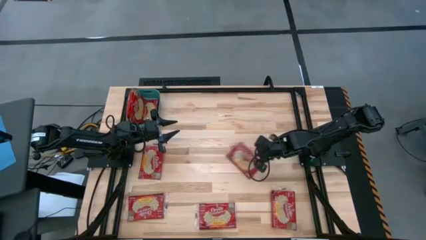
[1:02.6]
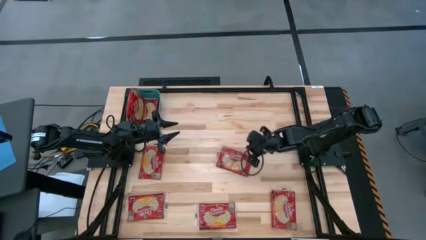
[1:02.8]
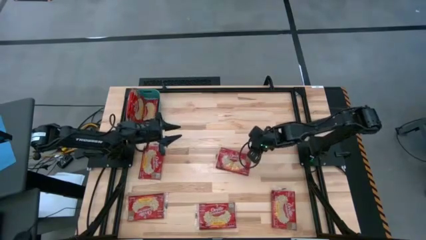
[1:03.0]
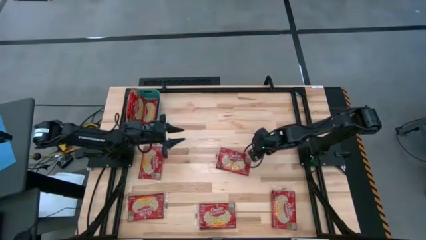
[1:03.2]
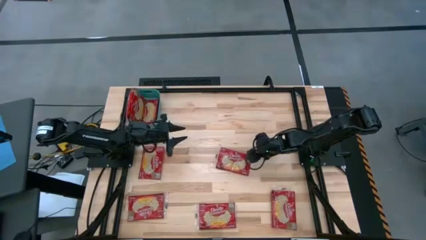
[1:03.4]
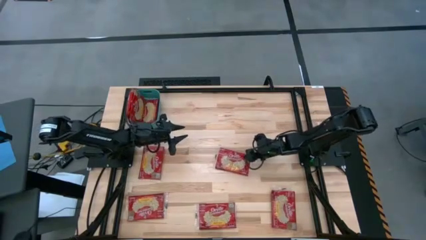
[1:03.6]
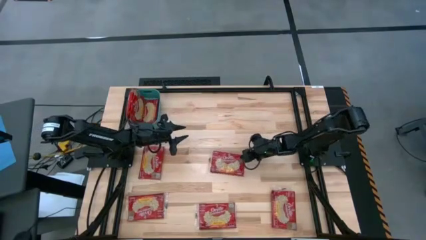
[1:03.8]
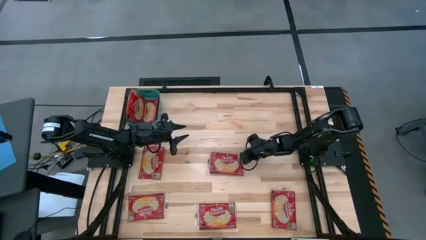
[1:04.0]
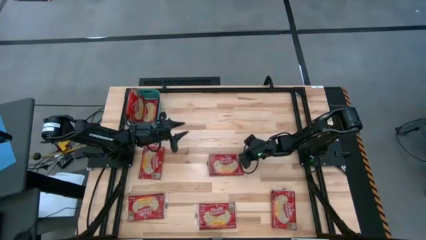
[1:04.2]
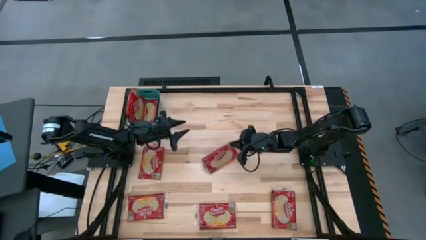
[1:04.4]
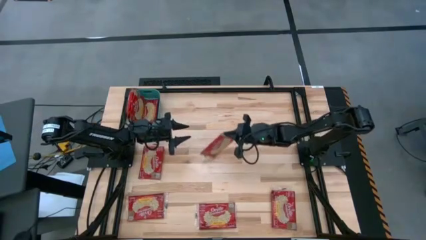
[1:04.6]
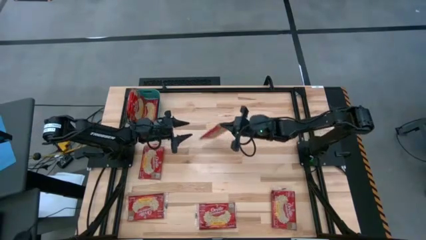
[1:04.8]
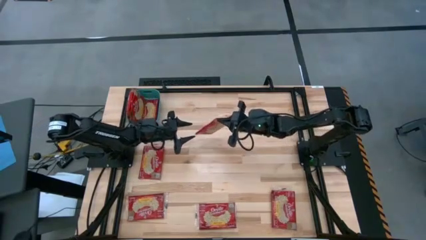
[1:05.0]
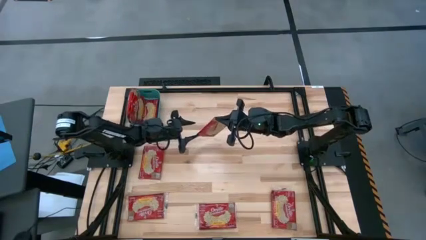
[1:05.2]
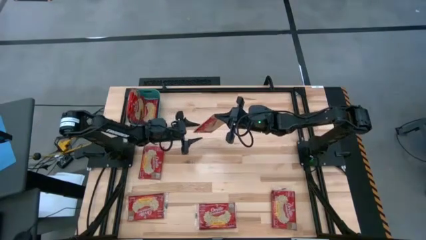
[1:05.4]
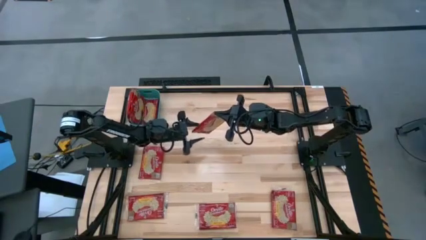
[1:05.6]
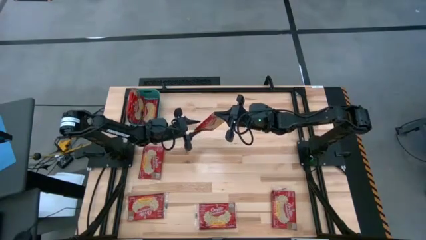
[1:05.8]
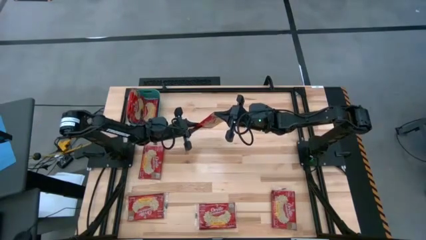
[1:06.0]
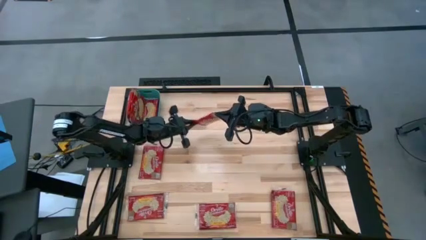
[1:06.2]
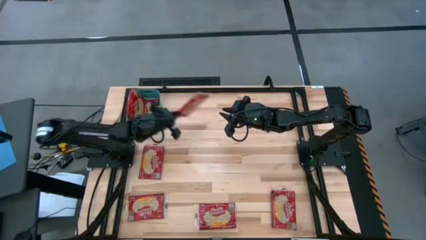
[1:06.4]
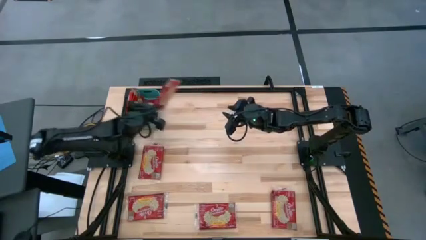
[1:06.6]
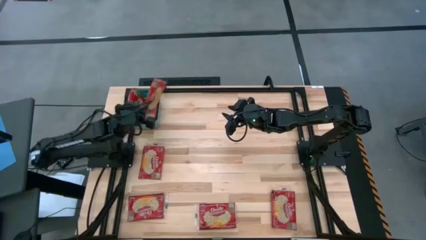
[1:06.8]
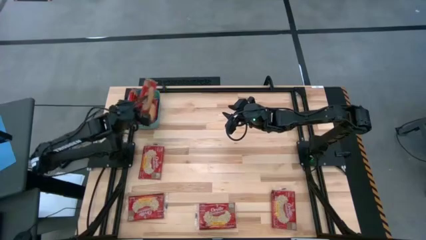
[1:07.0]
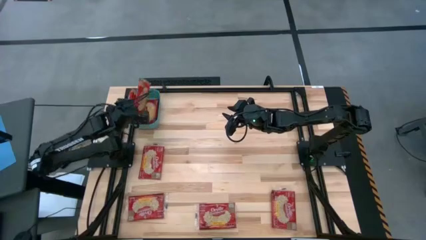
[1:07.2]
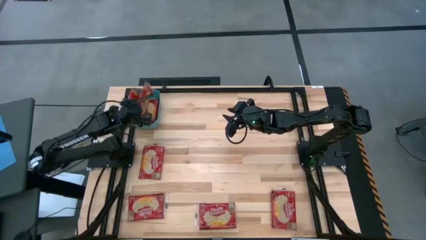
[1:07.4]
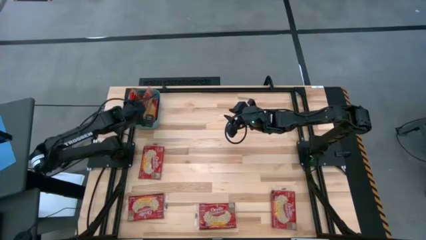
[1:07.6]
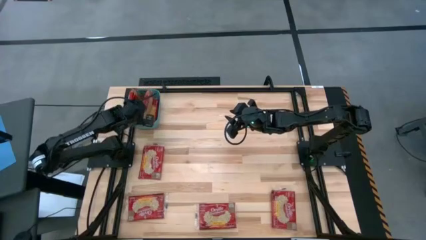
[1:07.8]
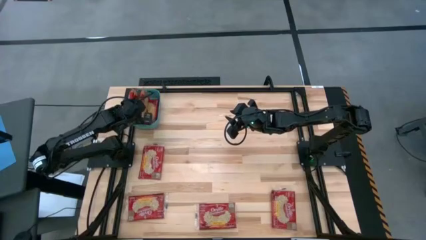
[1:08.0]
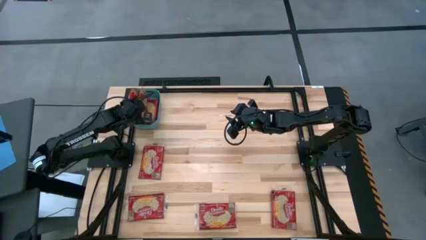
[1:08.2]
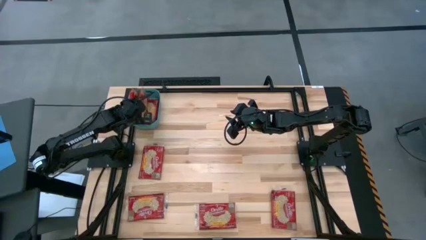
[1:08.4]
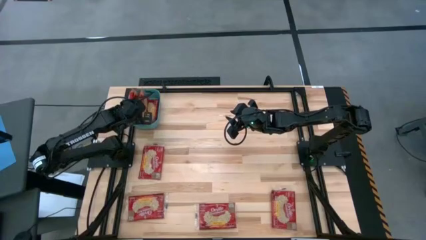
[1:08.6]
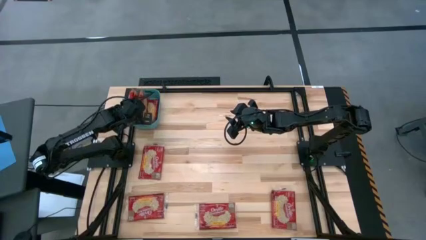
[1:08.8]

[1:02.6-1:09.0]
Task: Sort popcorn bags into baskets
Put the red popcorn bag in the blue bin

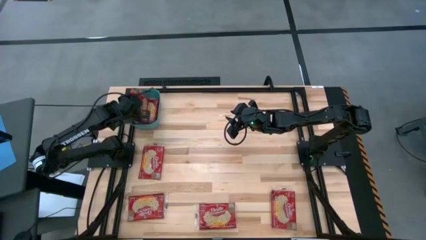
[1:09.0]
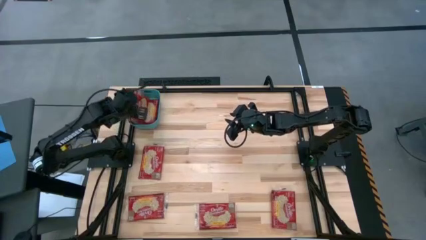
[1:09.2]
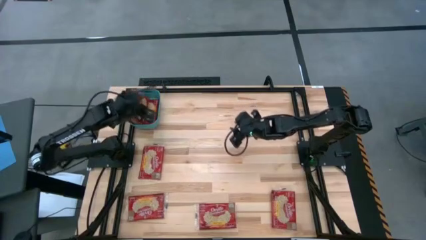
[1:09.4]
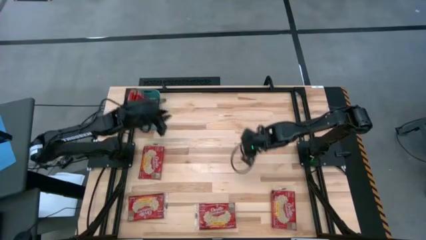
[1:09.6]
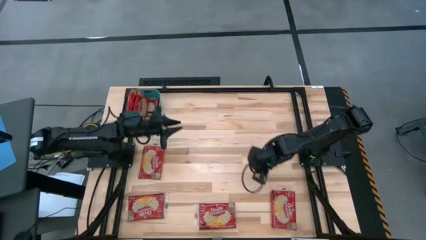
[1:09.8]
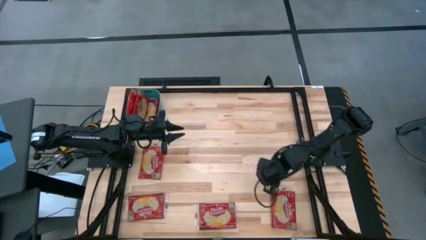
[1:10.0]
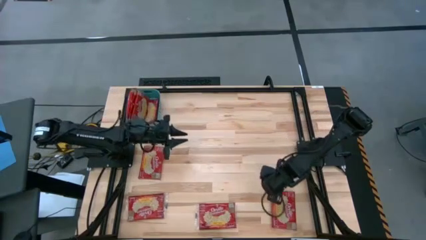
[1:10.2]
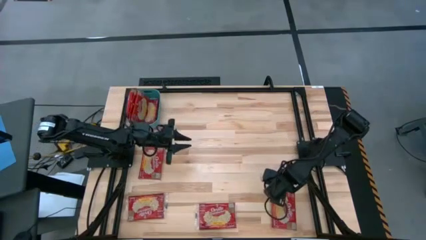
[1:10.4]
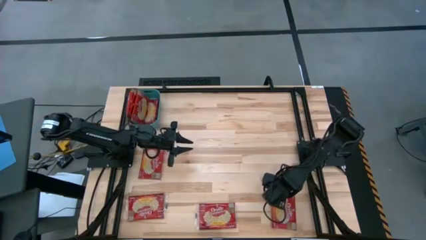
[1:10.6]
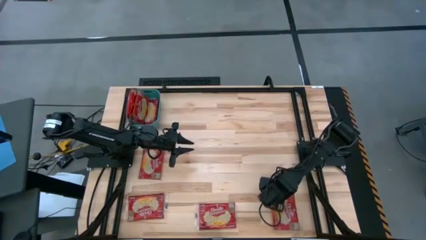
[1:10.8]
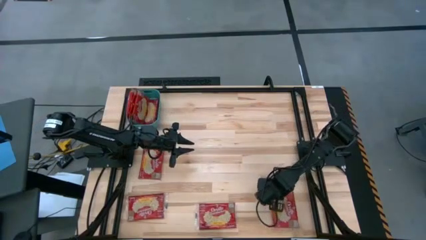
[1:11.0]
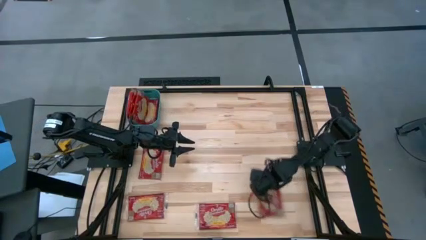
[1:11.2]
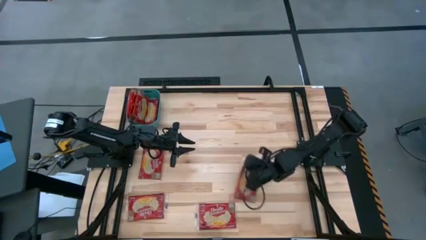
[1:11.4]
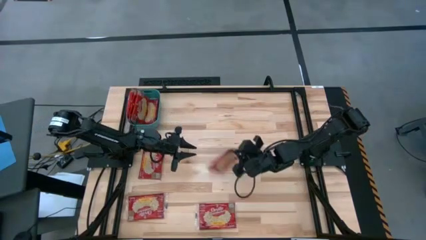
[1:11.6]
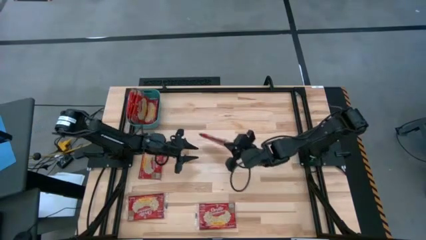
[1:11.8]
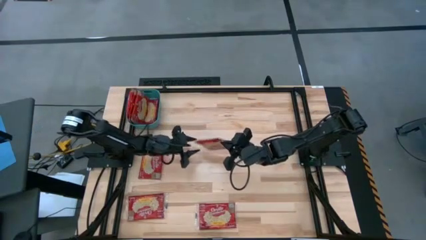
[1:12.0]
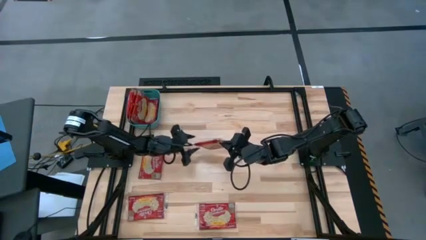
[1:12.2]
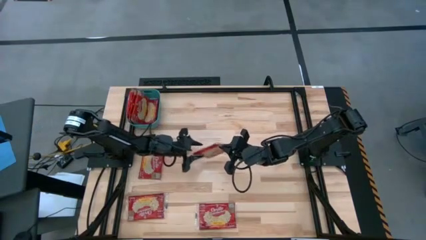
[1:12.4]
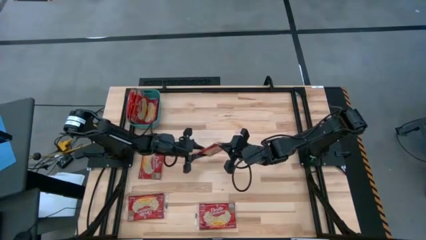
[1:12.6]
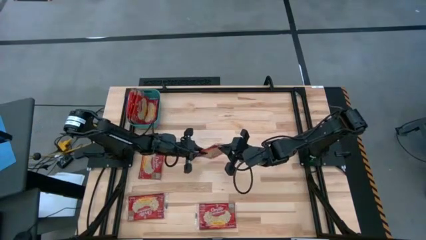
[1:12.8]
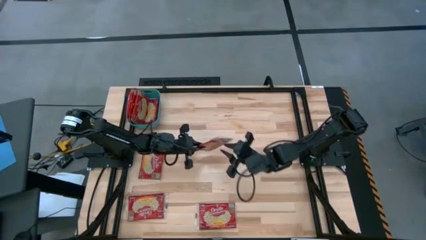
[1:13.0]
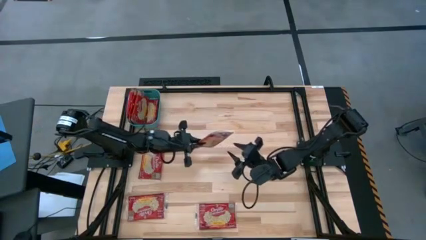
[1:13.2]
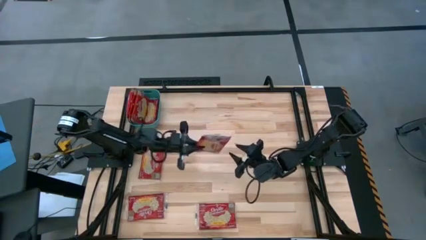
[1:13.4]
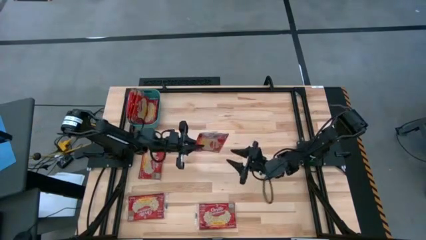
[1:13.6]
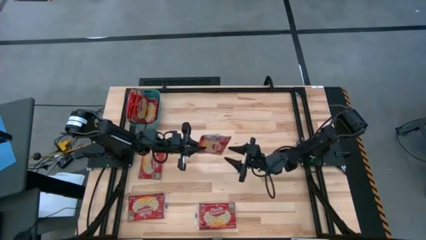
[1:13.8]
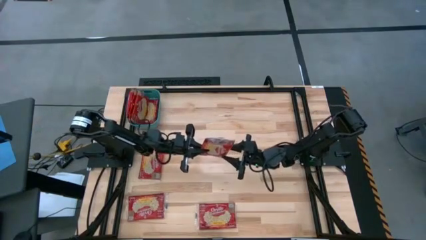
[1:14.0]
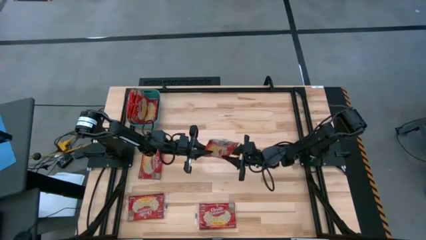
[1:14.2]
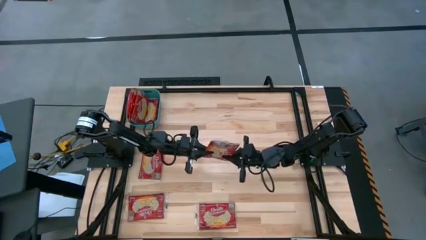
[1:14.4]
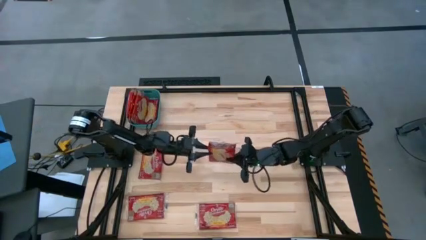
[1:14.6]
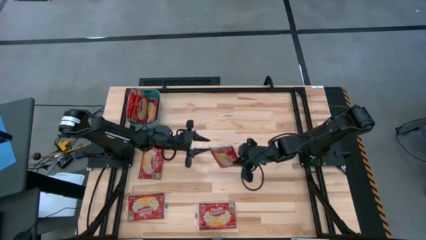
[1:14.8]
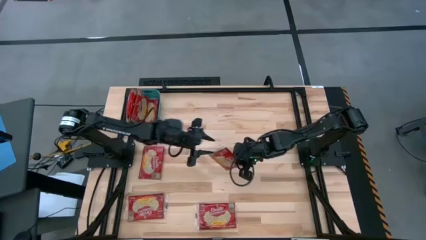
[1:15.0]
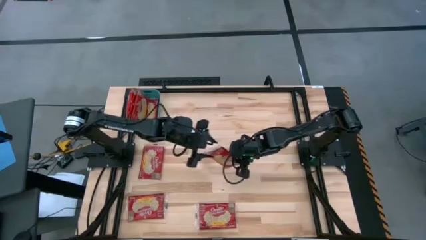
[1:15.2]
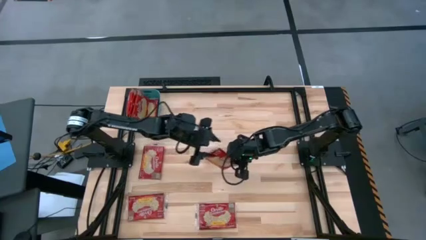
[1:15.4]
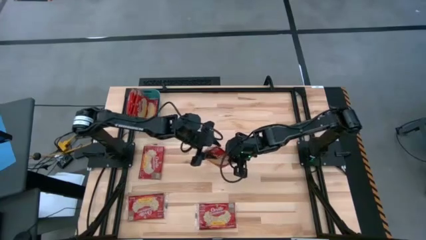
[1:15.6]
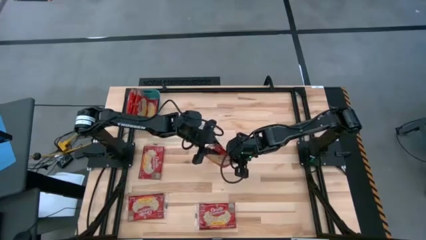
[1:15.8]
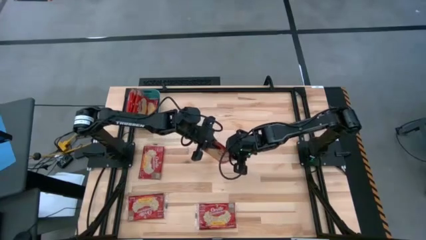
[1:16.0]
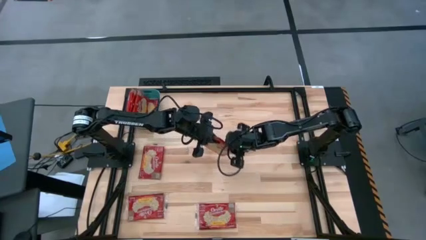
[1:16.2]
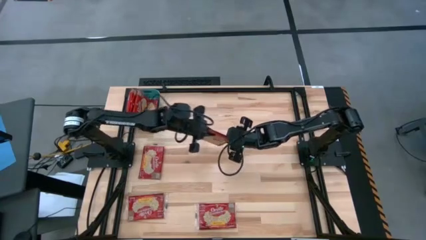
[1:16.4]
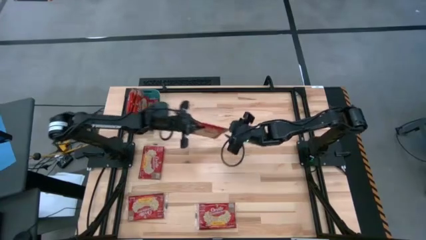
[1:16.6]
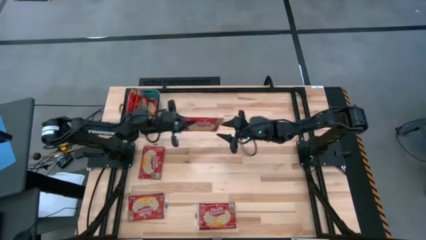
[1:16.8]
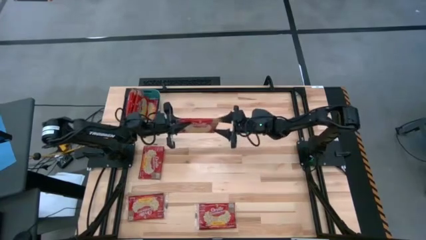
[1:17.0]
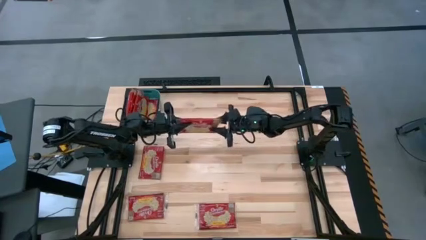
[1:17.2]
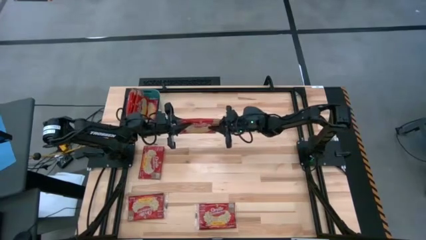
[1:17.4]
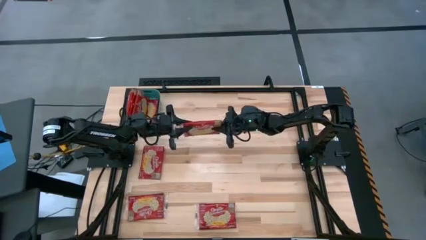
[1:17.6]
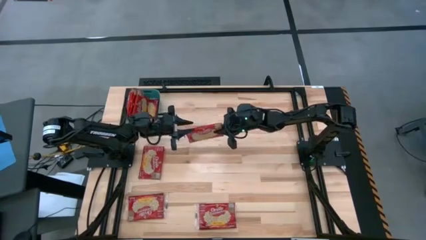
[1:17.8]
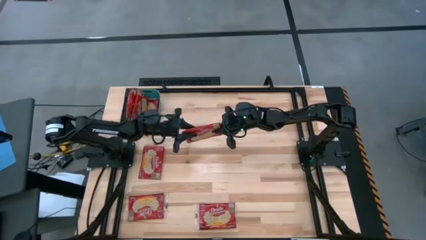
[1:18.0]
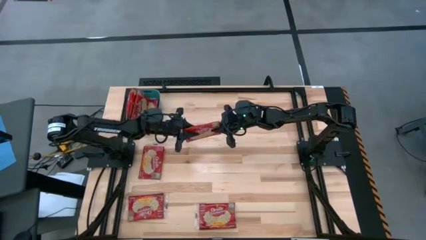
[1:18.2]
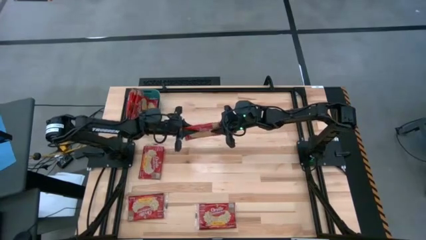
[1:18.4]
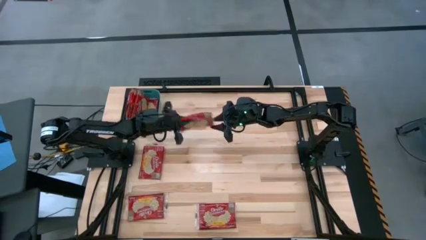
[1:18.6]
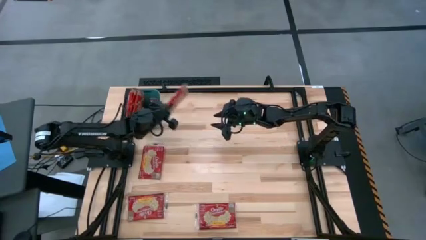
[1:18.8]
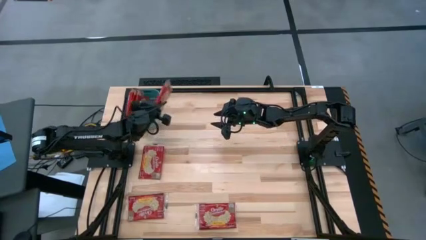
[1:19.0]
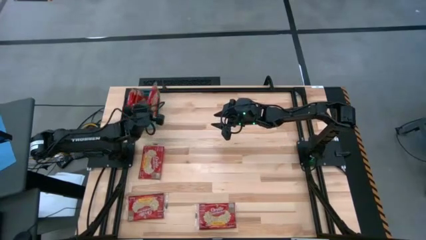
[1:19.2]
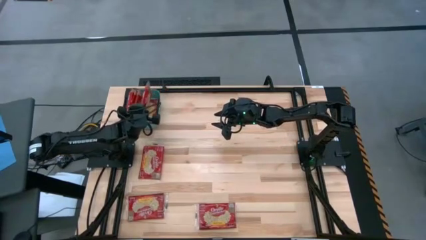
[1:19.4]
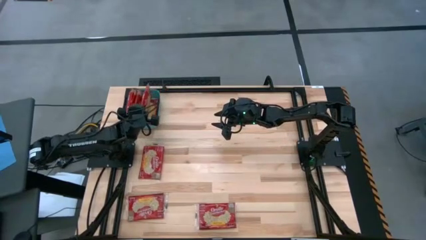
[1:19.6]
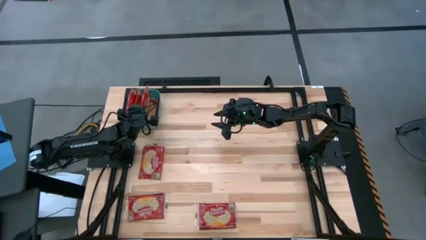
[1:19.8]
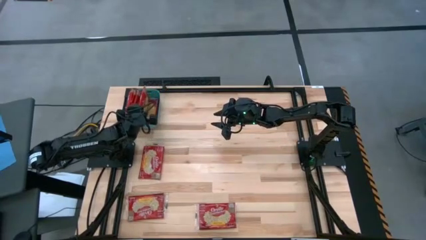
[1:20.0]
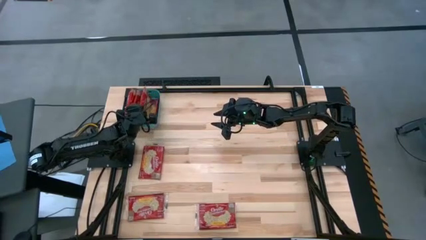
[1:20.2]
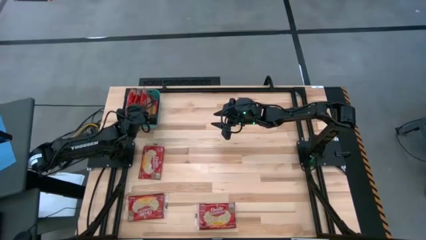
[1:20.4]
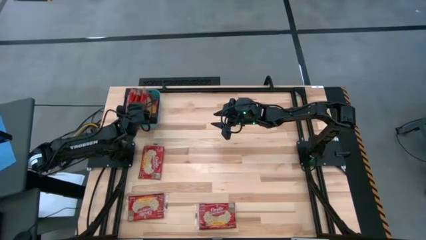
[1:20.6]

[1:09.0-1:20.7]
Put the red popcorn bag in the blue bin
